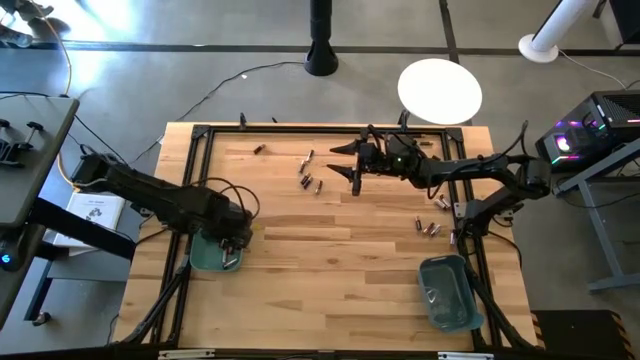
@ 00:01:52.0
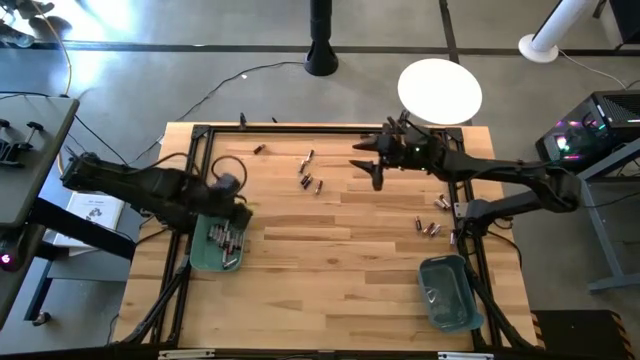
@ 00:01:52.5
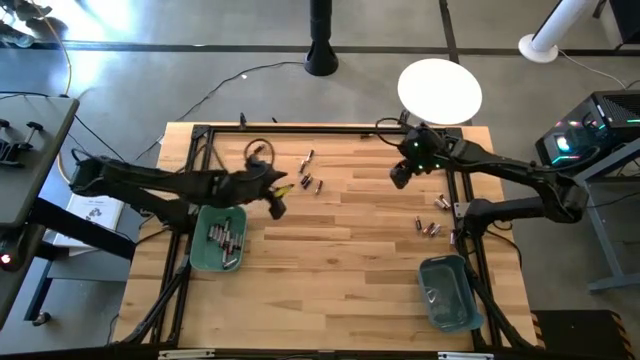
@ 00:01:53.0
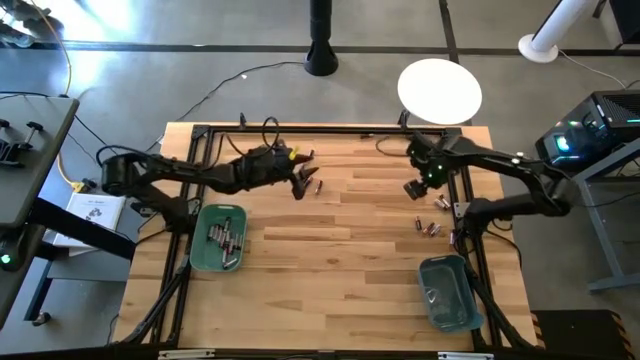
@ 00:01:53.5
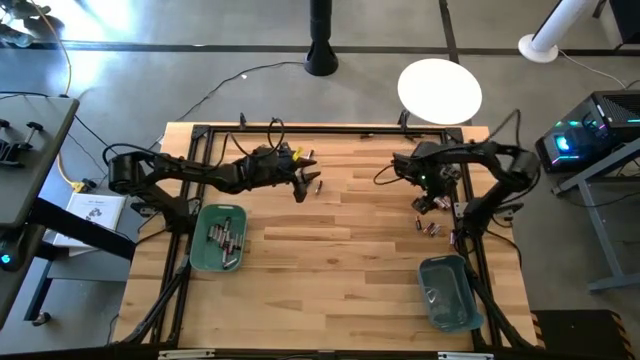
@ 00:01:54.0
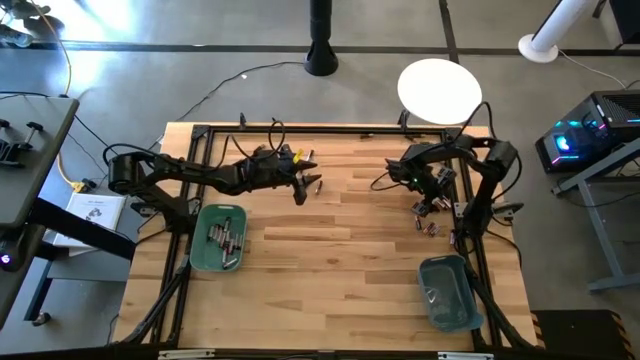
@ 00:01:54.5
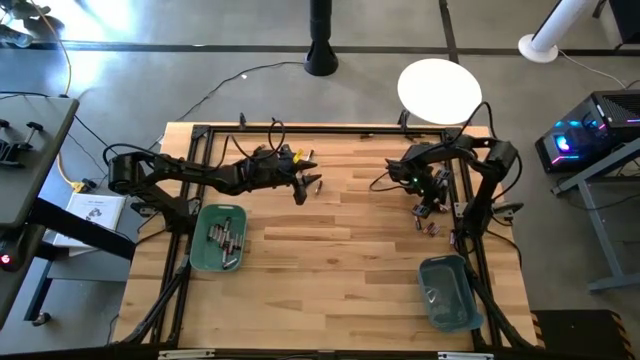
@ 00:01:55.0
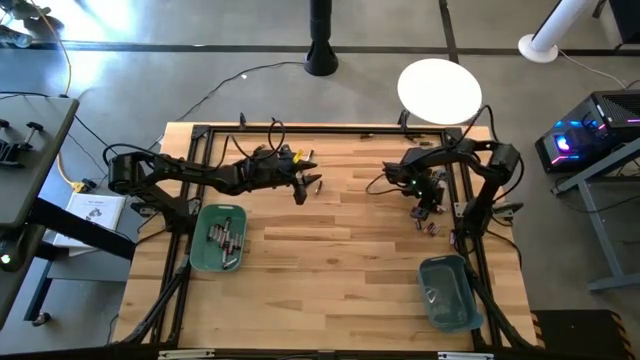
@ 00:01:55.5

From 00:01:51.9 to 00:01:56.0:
Task: Sort batteries
Put the silver battery into the green bin

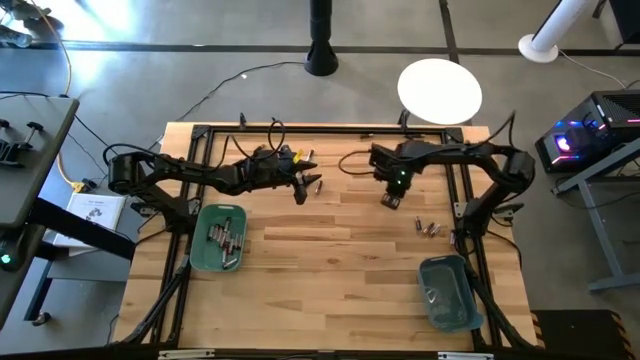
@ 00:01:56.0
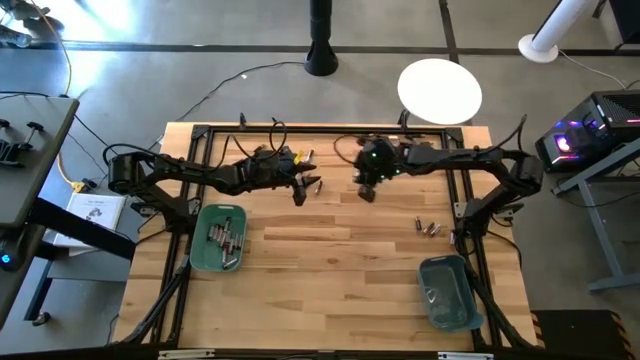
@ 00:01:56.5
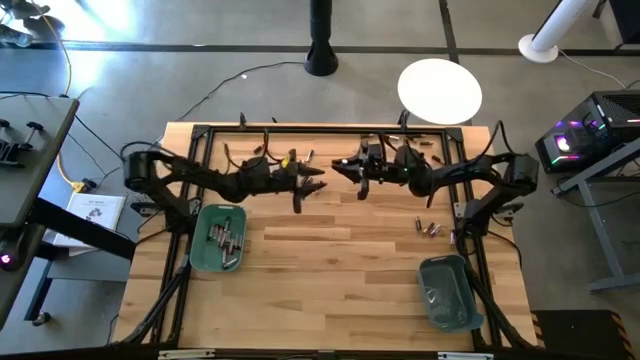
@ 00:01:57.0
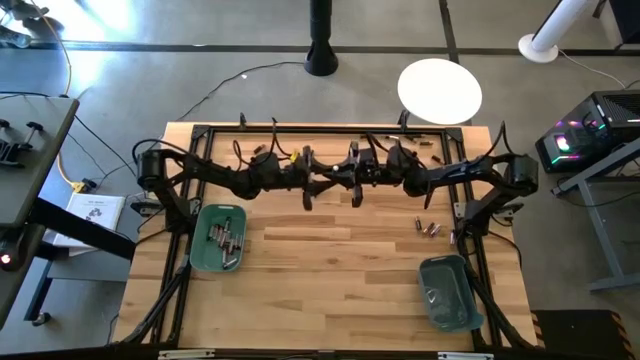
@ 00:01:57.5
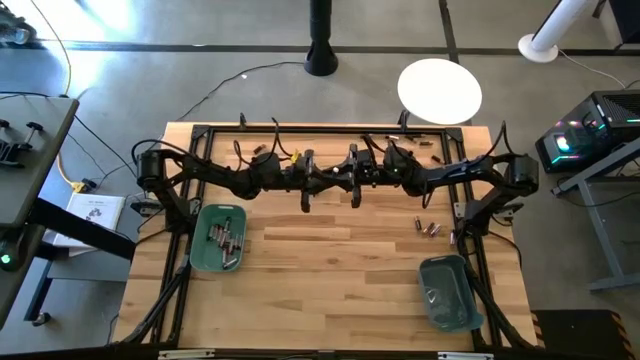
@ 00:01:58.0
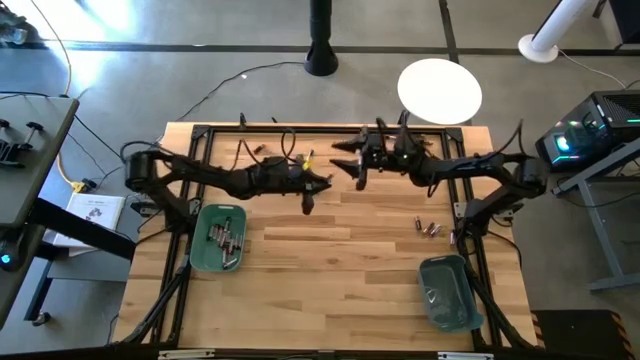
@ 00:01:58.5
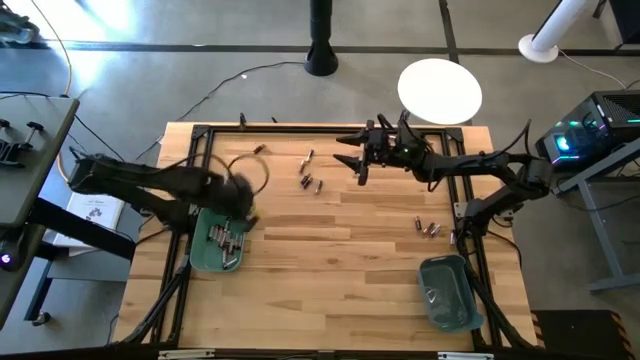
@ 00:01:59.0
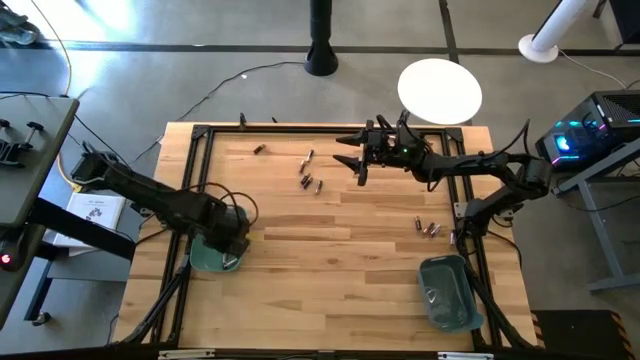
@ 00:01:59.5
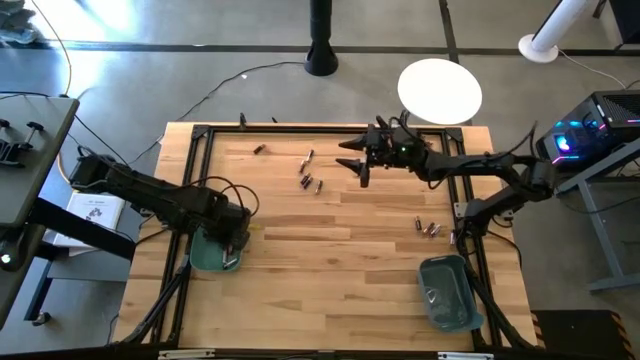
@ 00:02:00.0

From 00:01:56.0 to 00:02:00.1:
Put the silver battery into the green bin

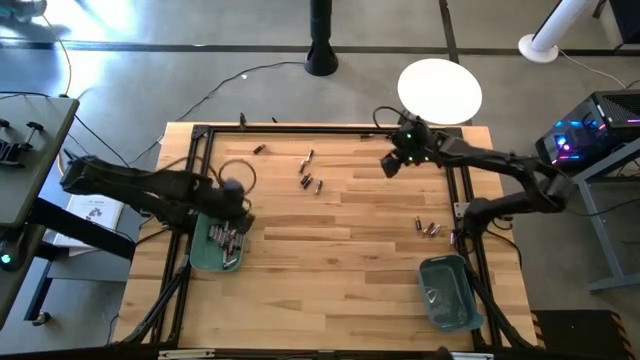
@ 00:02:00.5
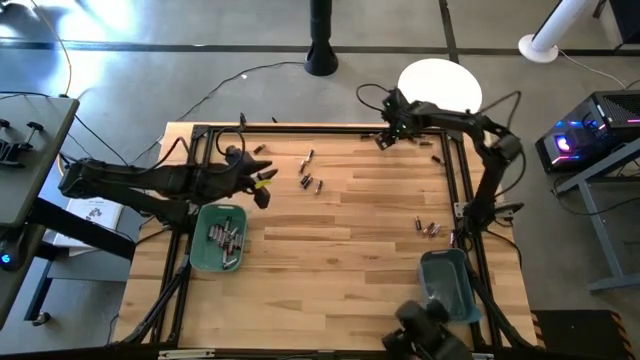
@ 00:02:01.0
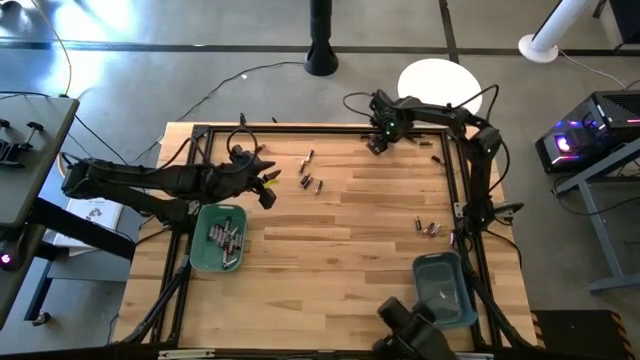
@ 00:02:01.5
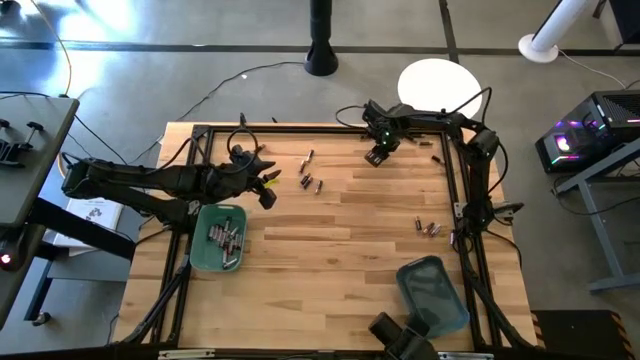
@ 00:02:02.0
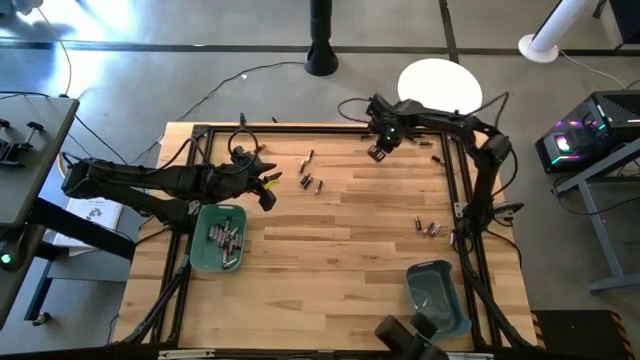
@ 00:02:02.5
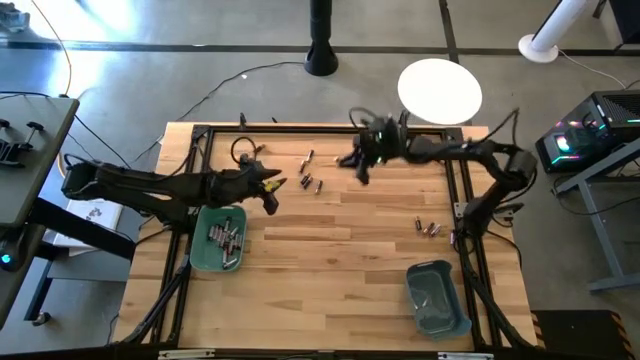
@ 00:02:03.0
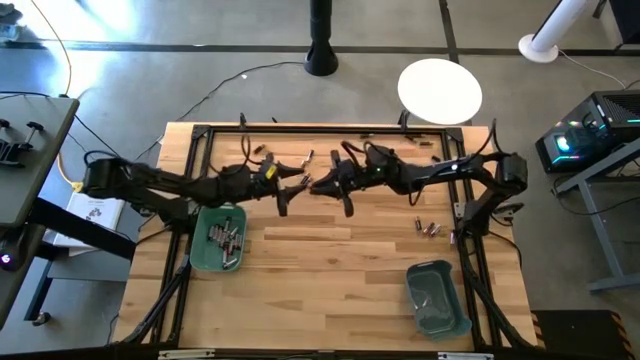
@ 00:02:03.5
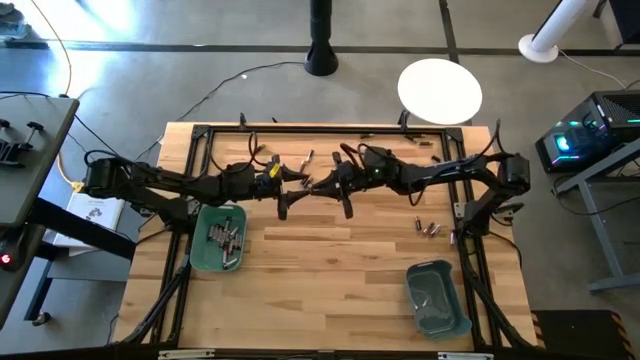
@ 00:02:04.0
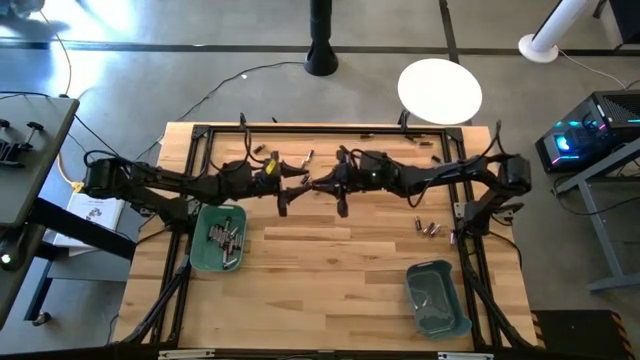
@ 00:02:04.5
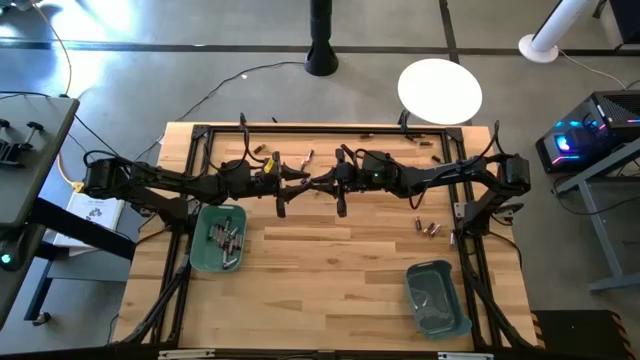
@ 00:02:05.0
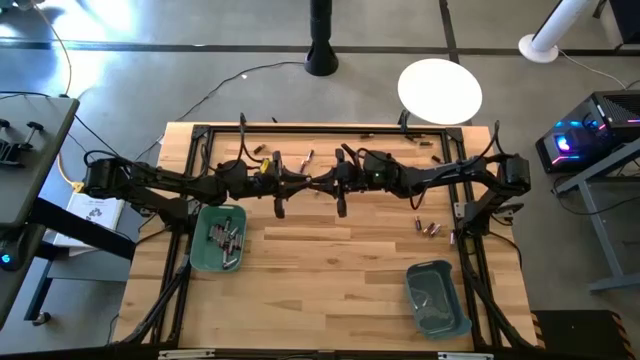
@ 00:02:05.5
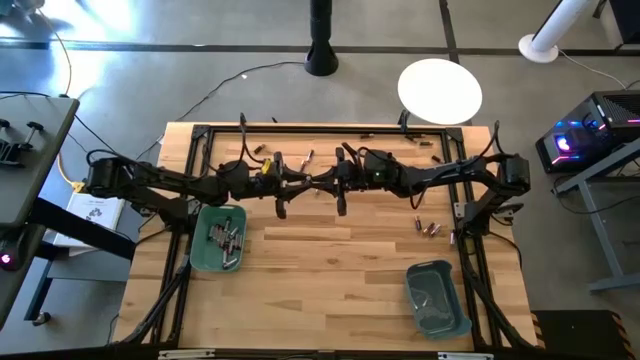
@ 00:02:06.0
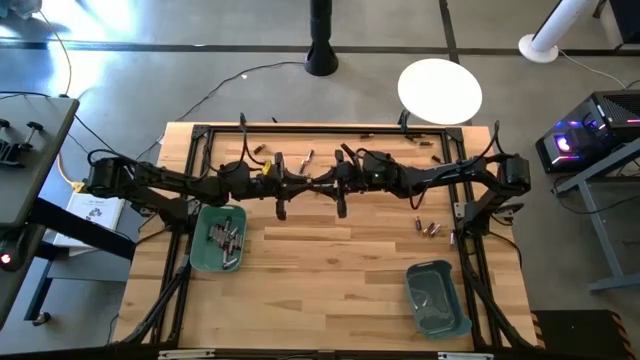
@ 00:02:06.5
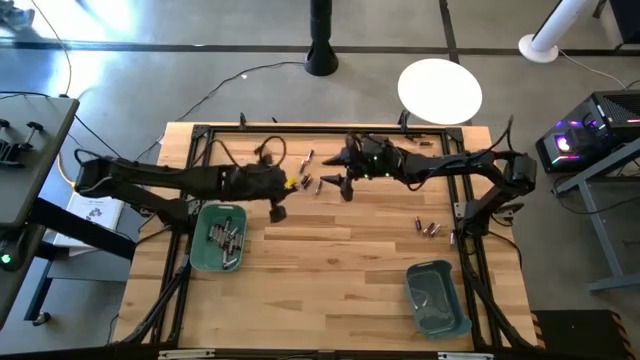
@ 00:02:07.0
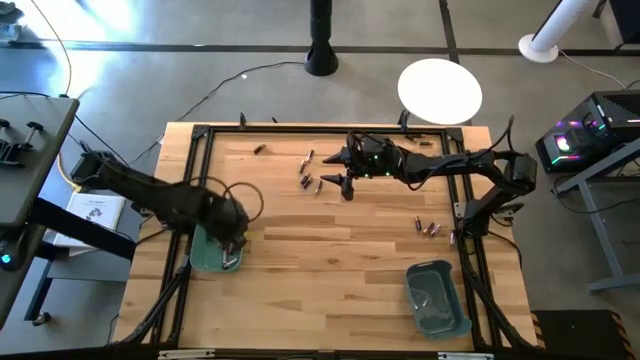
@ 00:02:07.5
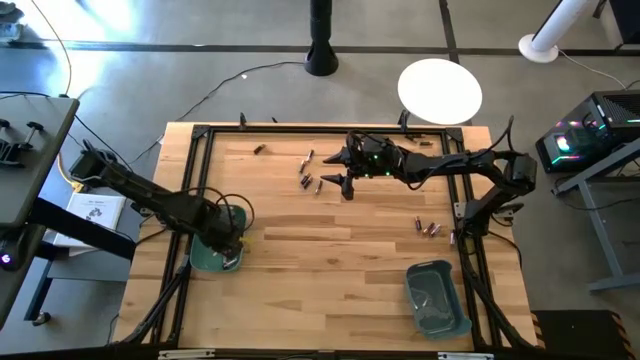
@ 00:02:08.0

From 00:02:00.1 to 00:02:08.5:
Put the silver battery into the green bin
